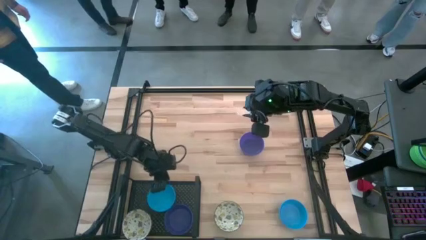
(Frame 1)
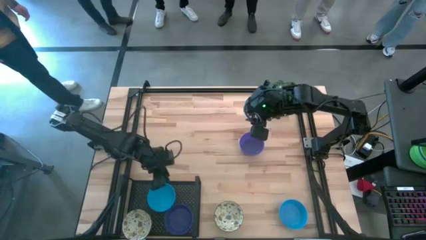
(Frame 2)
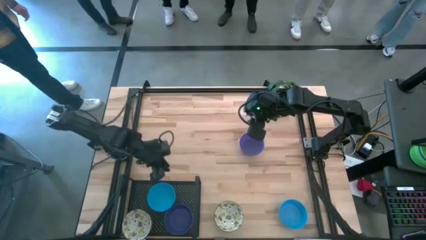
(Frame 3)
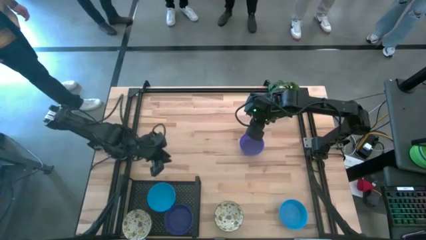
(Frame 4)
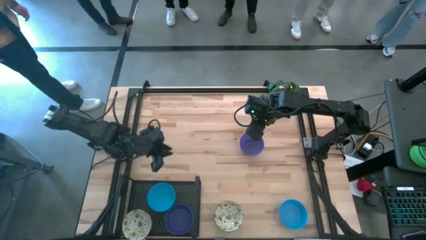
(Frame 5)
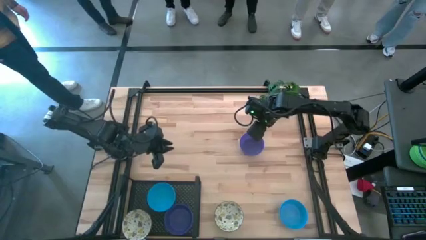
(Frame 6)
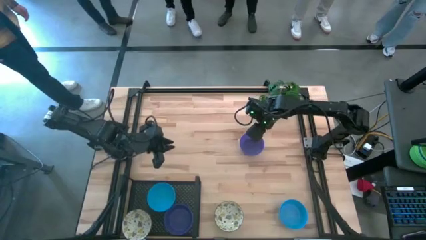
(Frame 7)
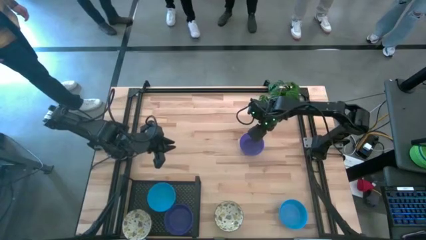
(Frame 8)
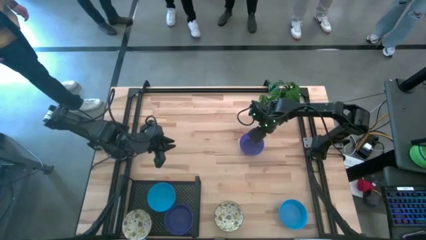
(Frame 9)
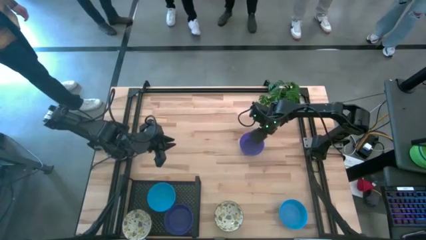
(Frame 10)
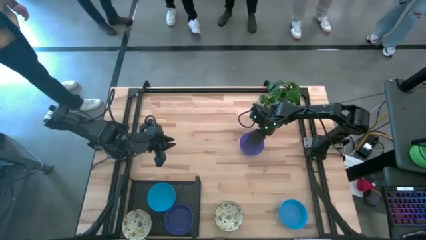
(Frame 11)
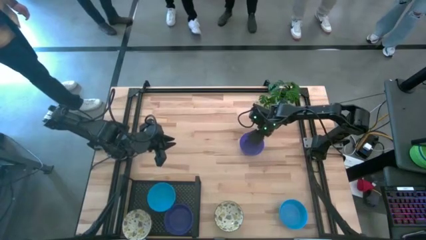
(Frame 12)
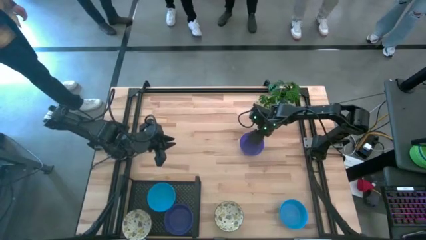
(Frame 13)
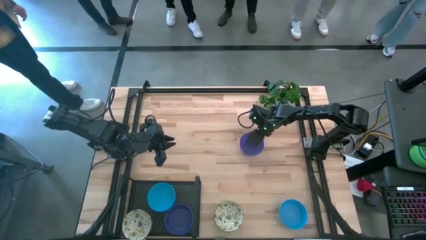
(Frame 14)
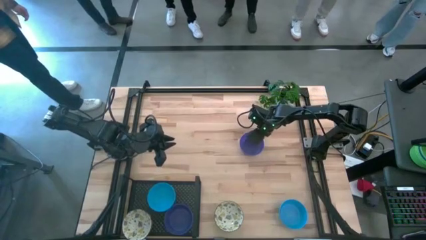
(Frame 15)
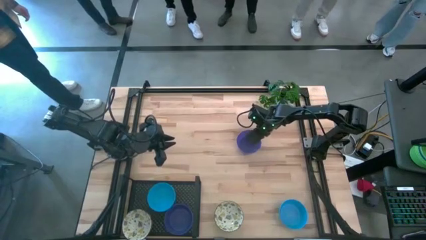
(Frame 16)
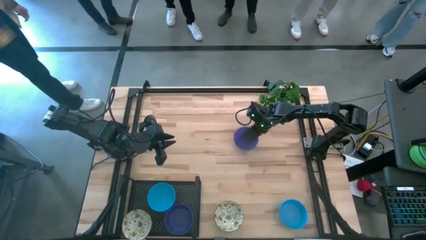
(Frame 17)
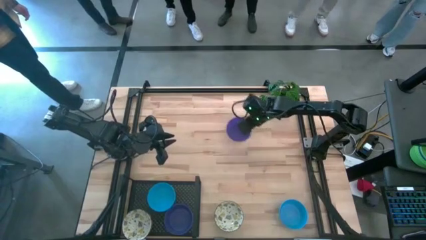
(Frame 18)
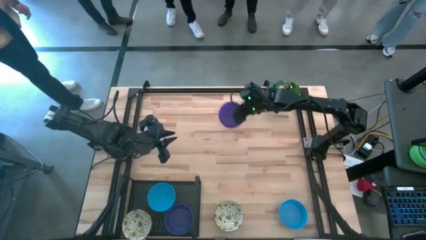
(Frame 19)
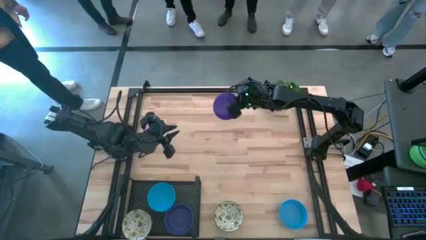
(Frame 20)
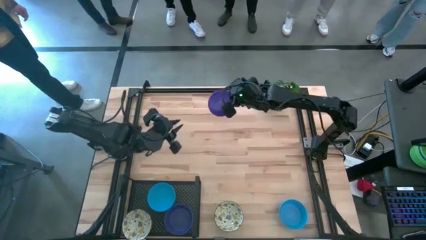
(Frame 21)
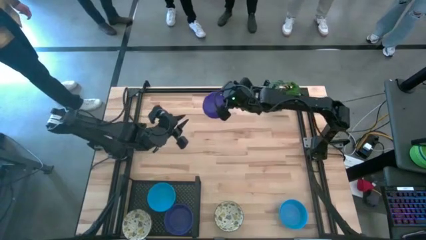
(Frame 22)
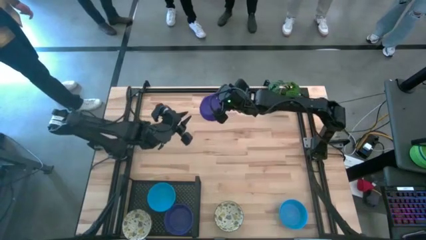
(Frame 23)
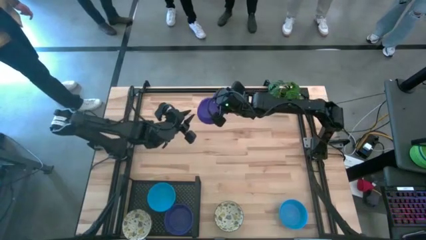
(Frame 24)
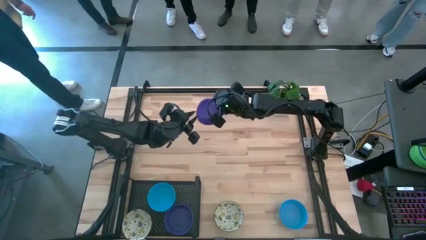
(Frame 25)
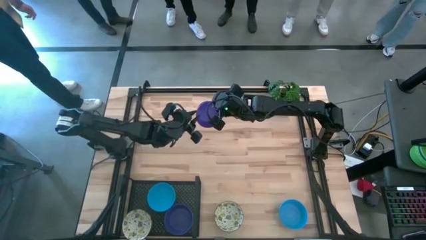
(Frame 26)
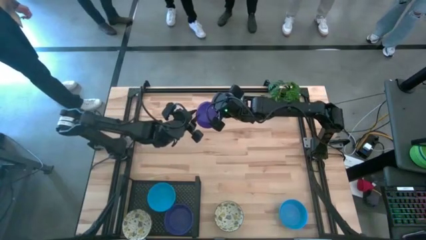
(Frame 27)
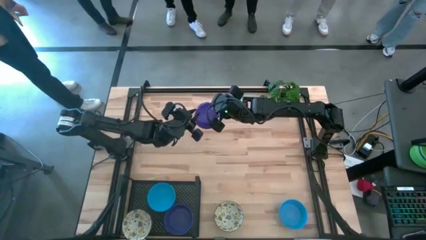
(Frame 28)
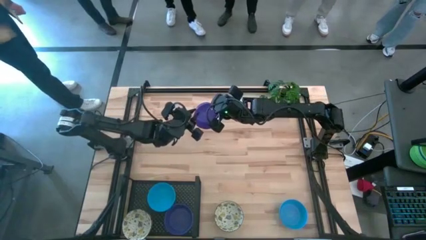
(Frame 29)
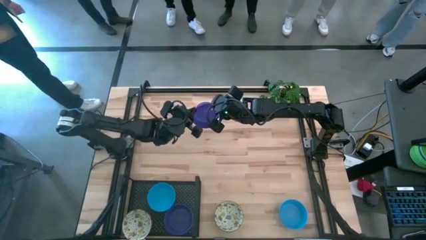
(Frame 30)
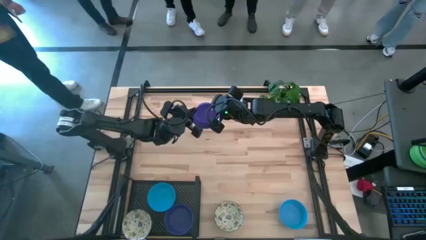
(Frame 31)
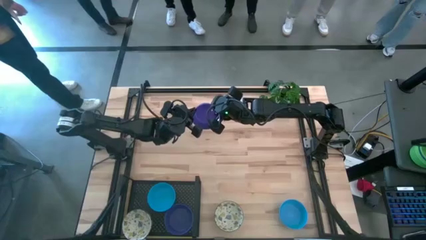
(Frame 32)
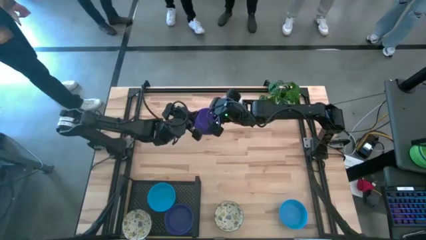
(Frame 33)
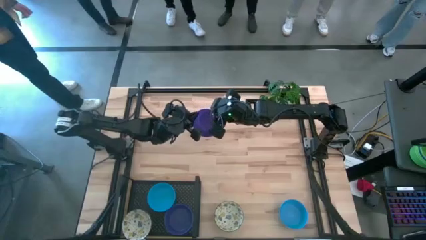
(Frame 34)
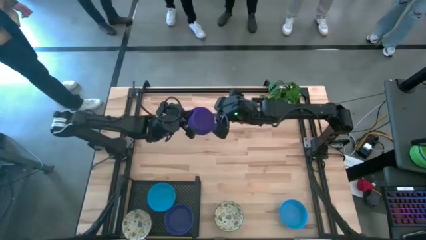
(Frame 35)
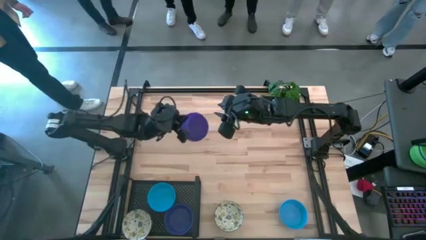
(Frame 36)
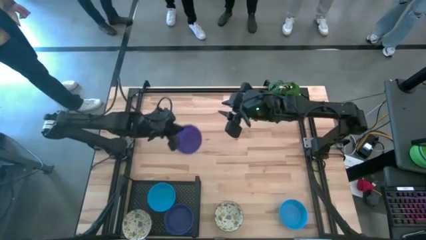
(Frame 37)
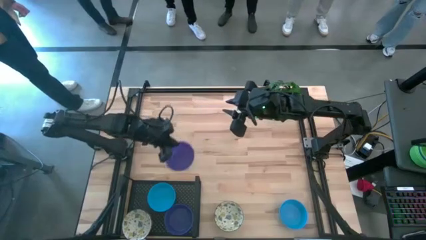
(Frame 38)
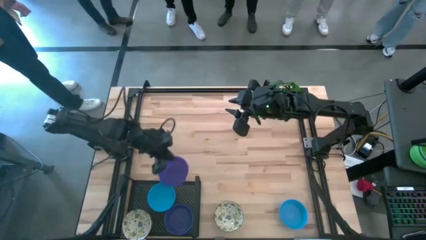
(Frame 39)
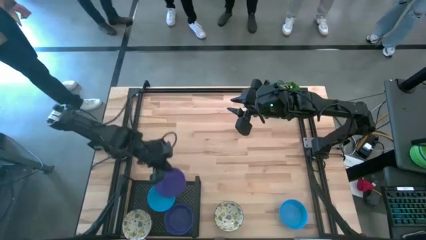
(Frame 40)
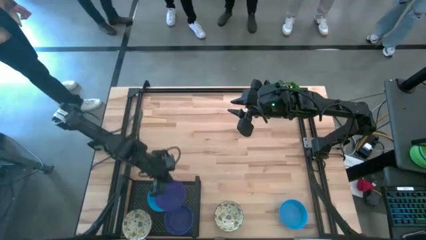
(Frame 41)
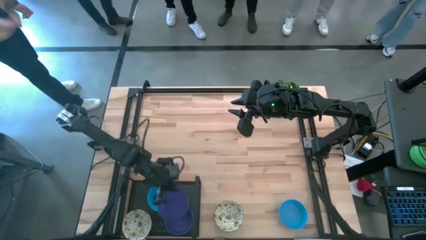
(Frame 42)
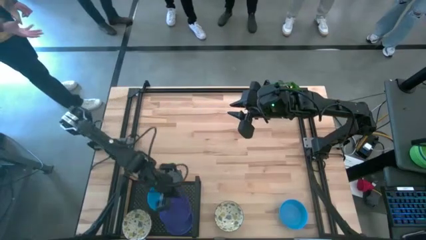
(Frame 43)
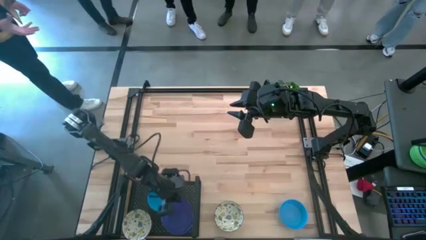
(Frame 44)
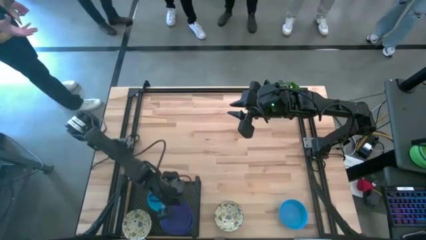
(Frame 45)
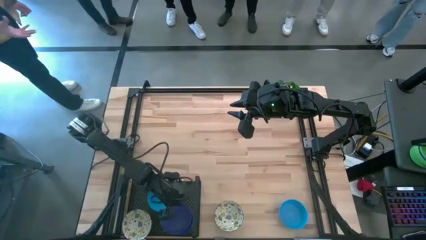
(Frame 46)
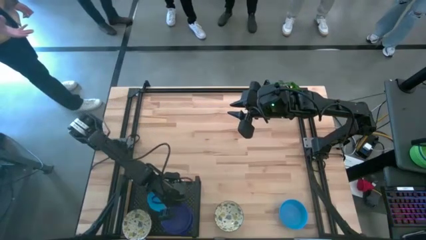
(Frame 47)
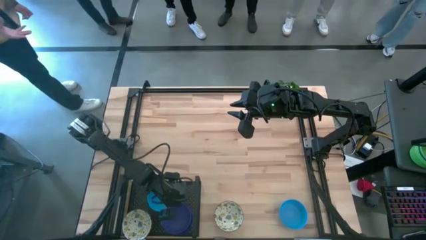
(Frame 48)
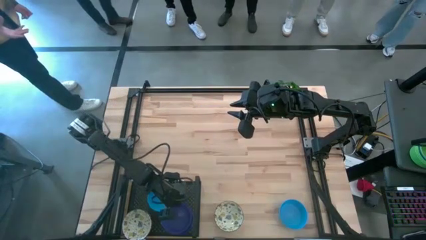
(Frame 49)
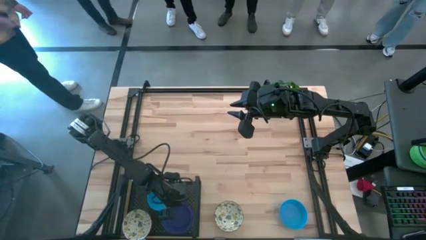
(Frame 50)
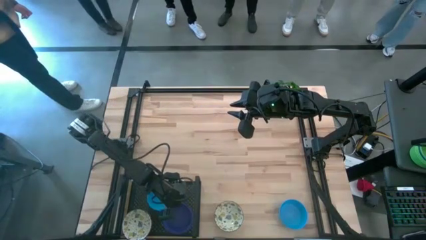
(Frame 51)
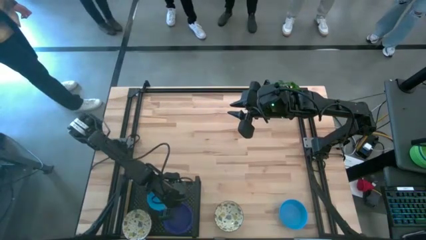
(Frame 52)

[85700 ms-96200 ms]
Task: Pick & Place Mini bowls
Stack the purple bowl on the purple bowl on the shelf

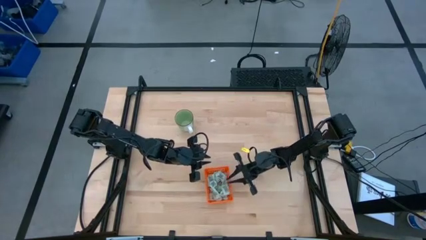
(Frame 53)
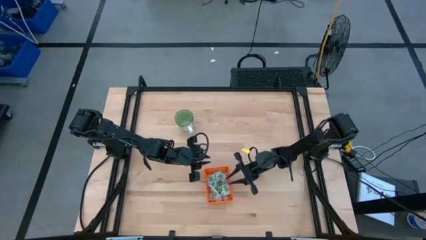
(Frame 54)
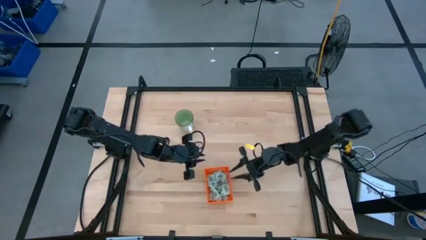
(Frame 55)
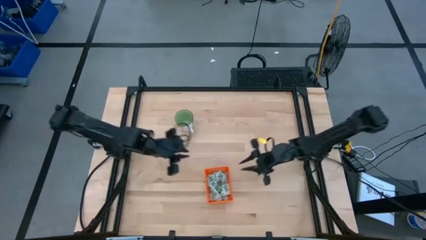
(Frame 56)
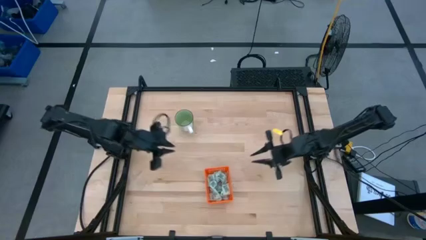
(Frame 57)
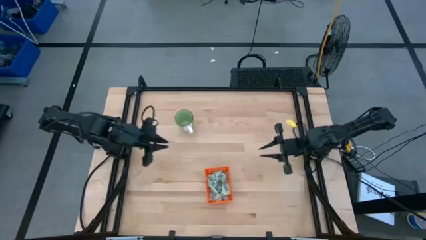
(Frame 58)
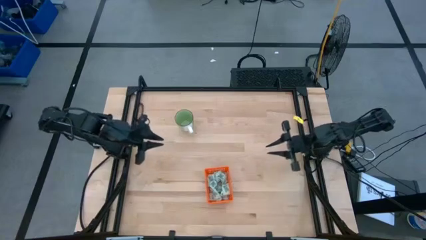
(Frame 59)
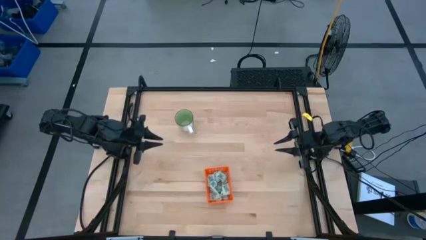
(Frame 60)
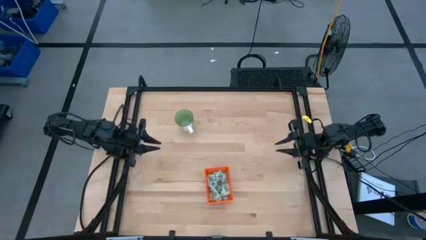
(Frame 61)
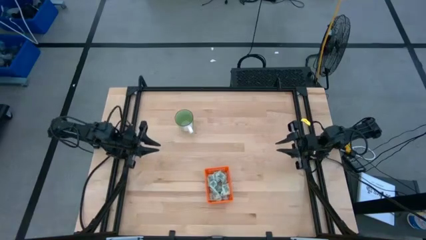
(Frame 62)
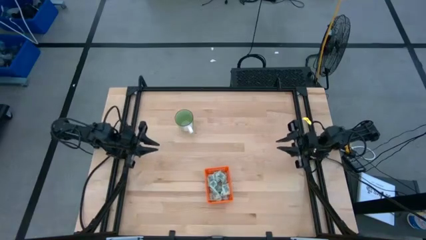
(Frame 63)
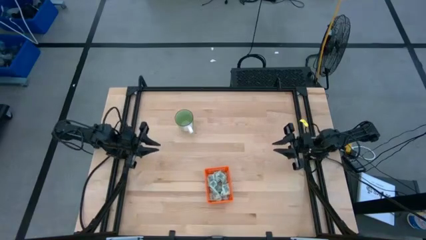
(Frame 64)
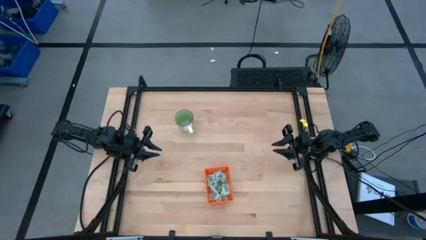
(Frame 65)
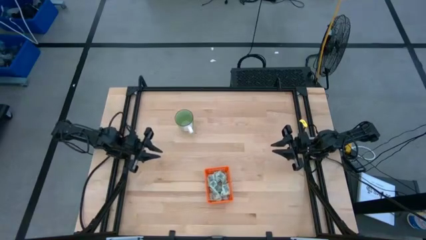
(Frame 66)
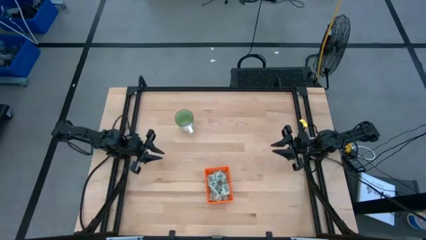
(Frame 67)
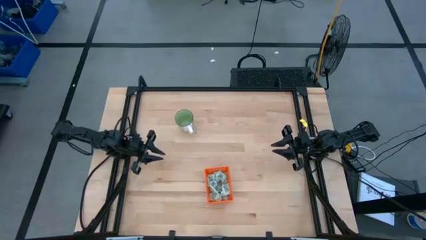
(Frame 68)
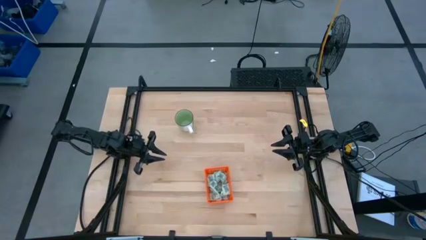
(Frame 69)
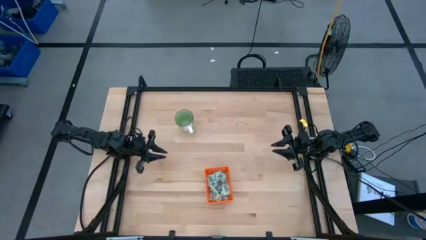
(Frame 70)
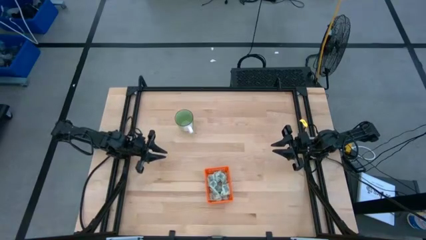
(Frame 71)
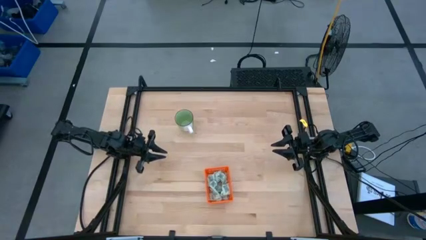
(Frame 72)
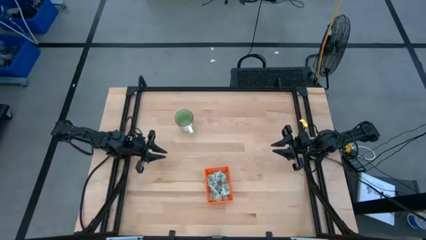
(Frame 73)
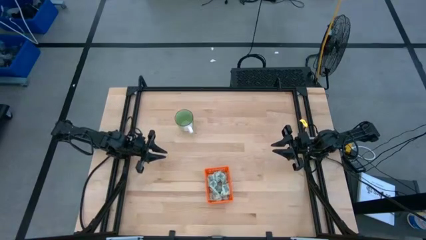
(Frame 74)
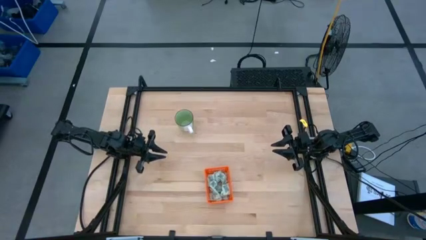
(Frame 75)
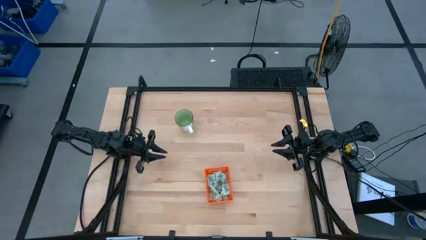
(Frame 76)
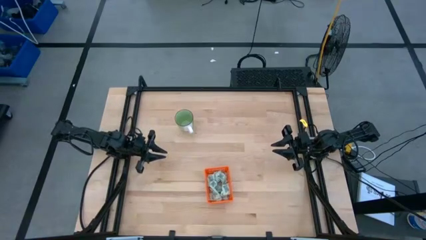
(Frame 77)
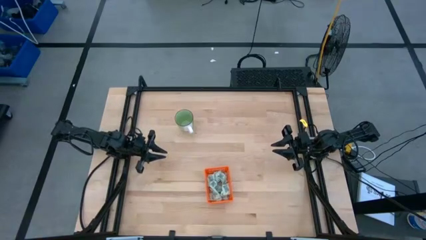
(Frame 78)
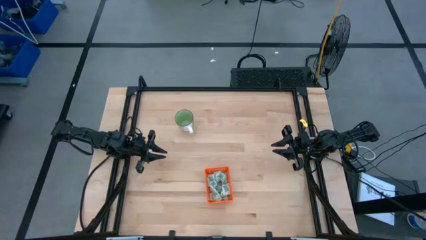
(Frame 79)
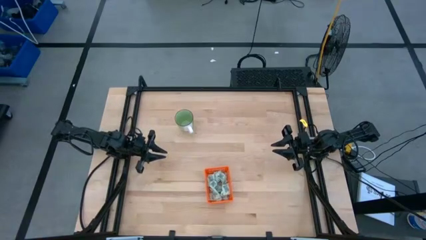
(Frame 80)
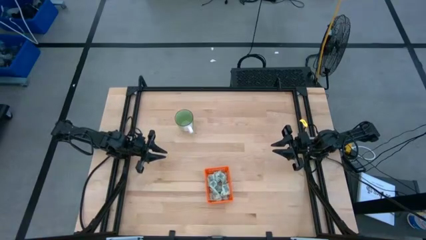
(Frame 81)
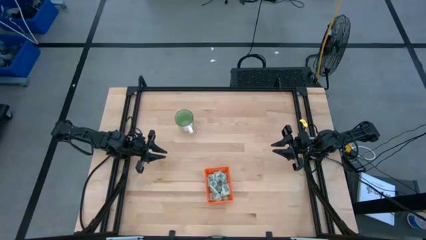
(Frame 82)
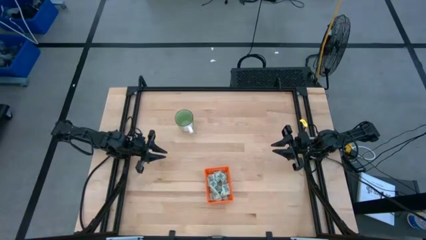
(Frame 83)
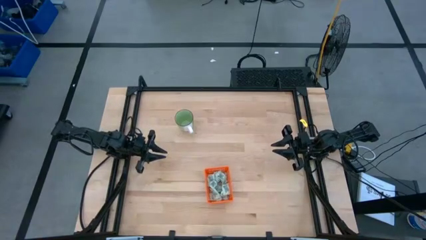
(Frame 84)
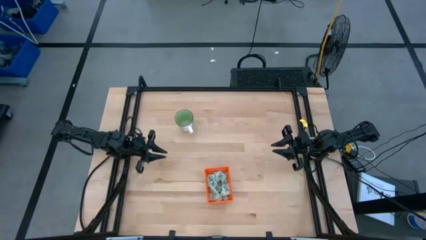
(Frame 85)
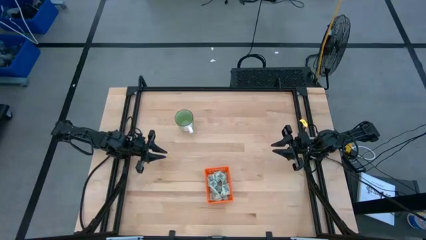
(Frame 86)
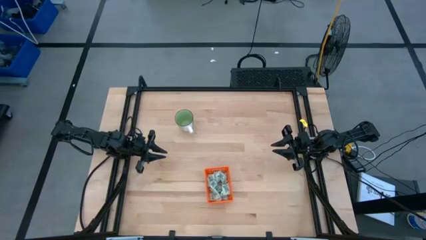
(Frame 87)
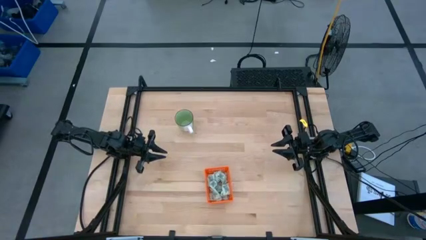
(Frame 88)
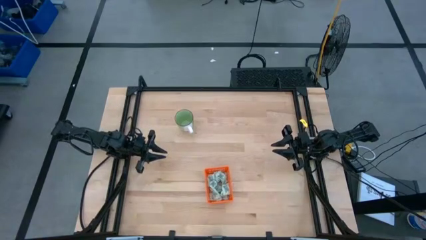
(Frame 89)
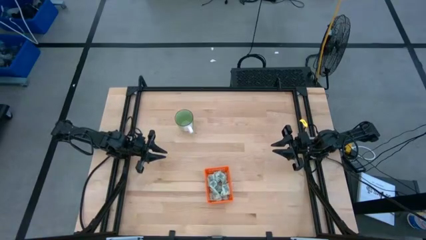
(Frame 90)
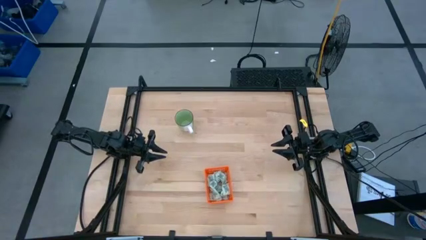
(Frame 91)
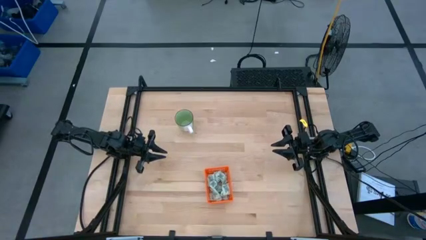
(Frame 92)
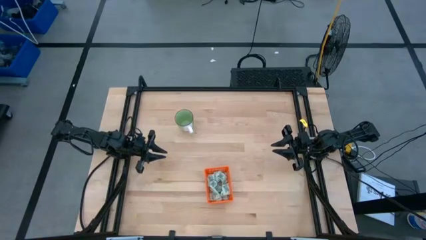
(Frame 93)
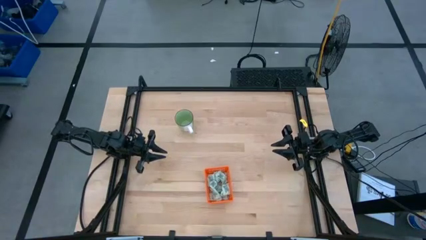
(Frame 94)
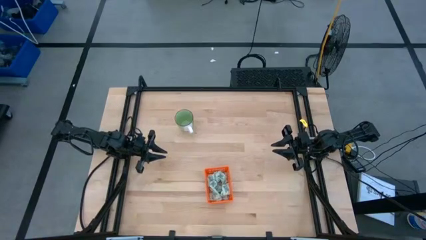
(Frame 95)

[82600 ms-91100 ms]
Task: Pick and place Stevia / Truvia into bins
Return to Home Position
